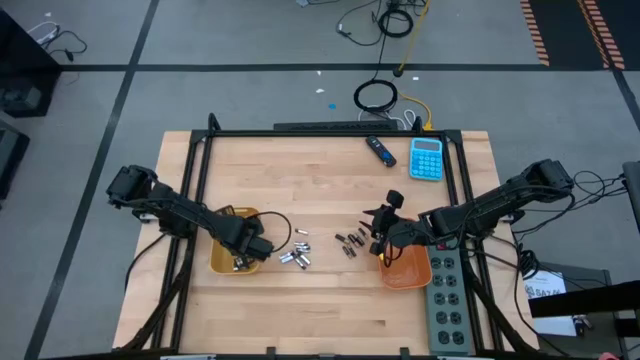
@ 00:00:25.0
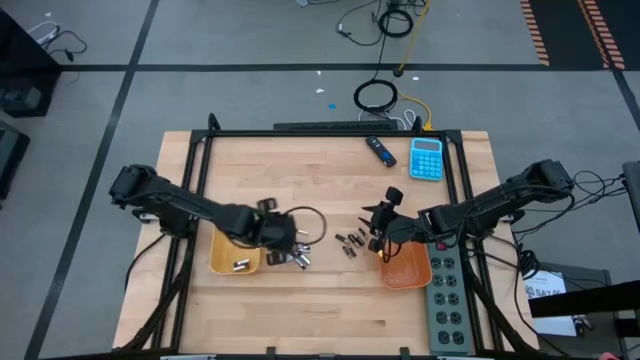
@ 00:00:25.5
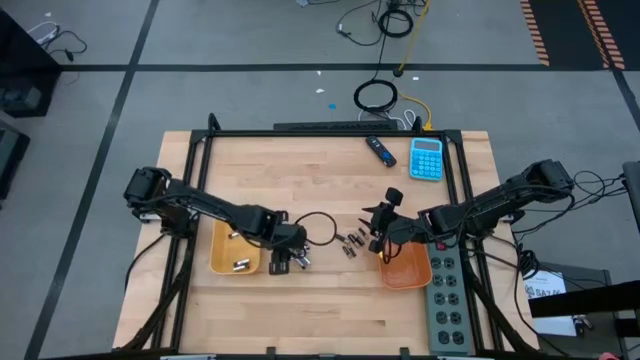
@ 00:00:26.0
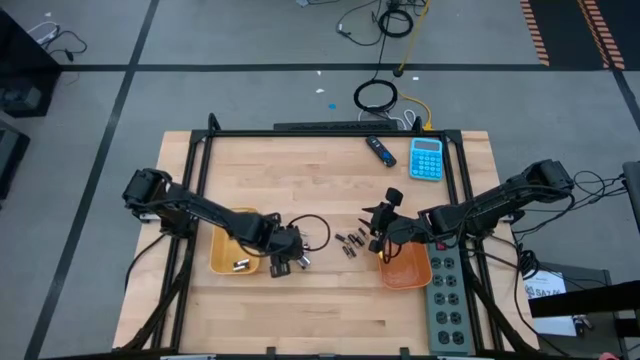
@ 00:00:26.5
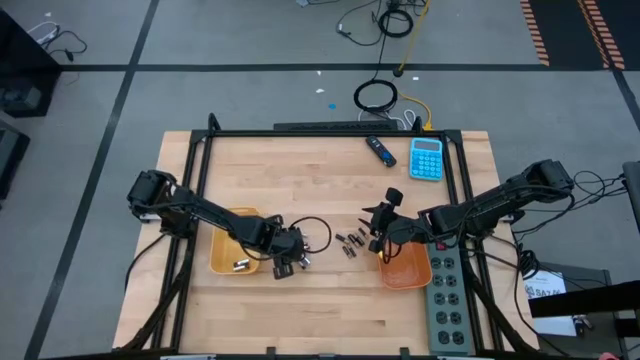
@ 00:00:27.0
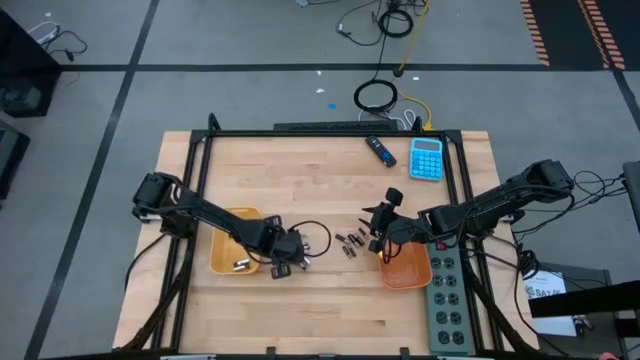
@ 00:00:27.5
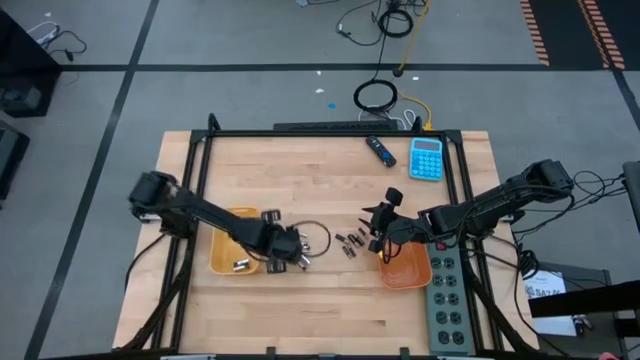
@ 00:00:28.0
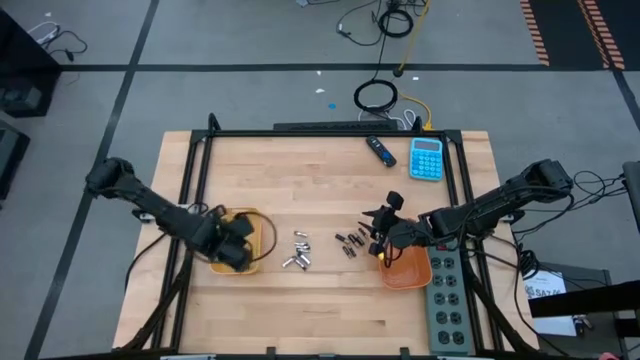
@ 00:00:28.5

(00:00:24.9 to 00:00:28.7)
Task: Sort batteries
Put the white battery into the yellow bin

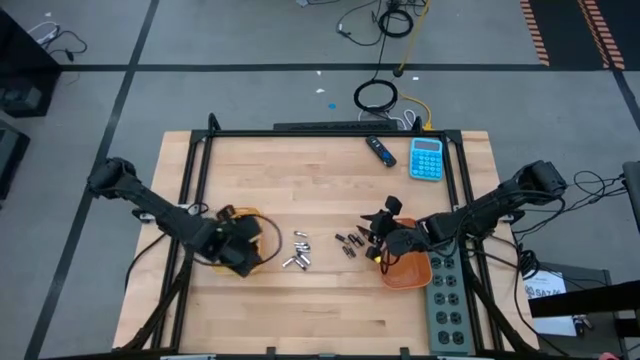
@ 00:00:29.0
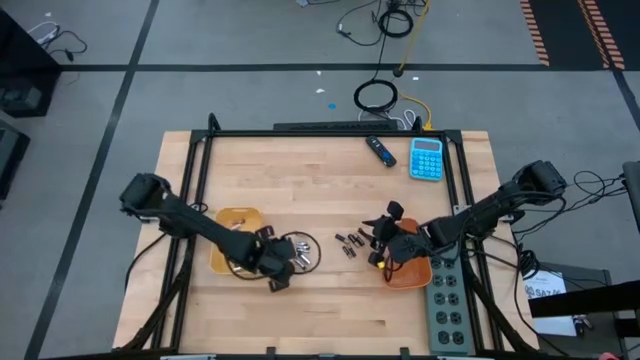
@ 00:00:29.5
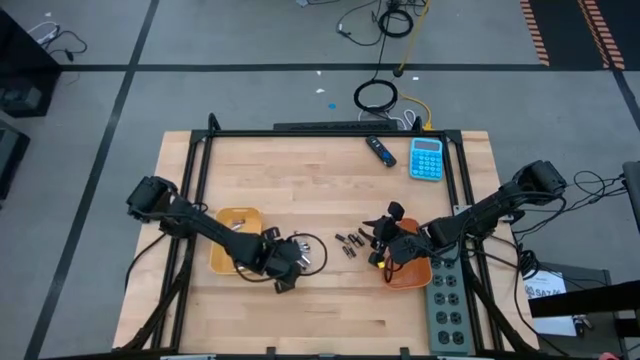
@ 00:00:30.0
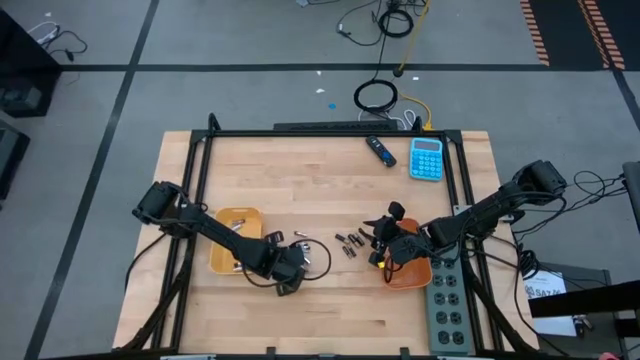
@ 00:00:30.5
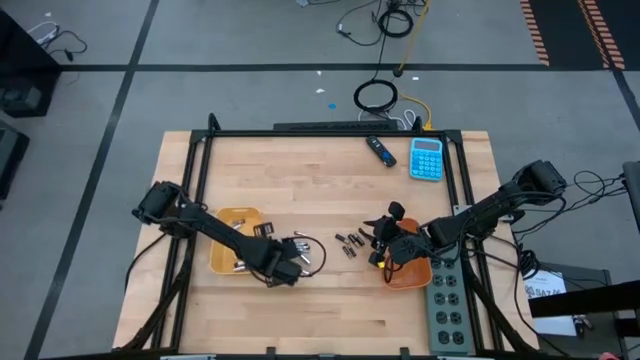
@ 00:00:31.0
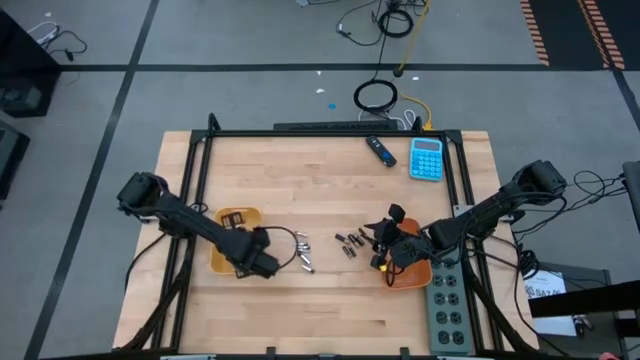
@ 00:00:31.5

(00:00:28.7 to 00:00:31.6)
Put the white battery into the yellow bin

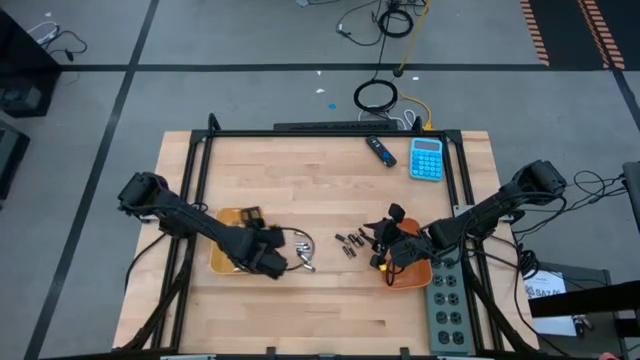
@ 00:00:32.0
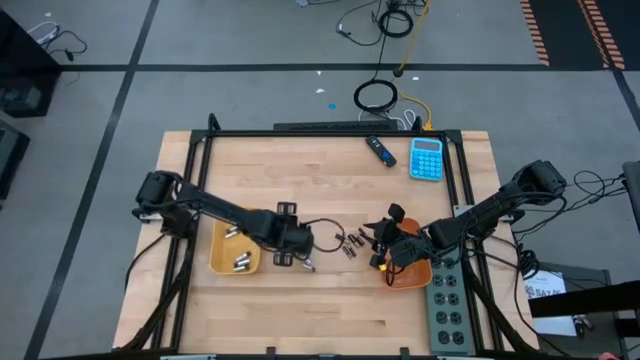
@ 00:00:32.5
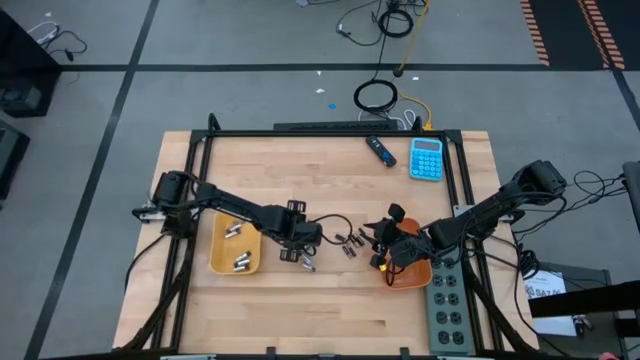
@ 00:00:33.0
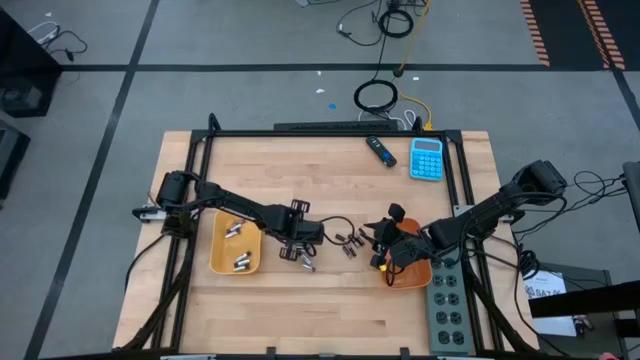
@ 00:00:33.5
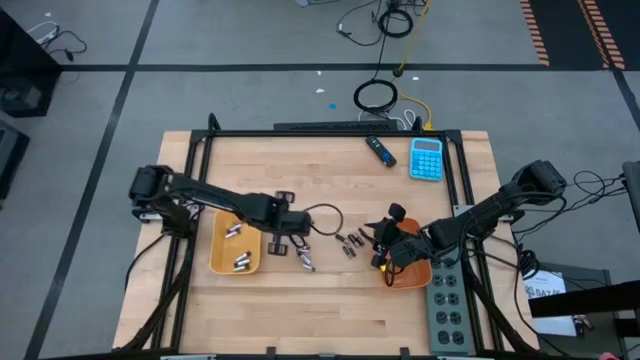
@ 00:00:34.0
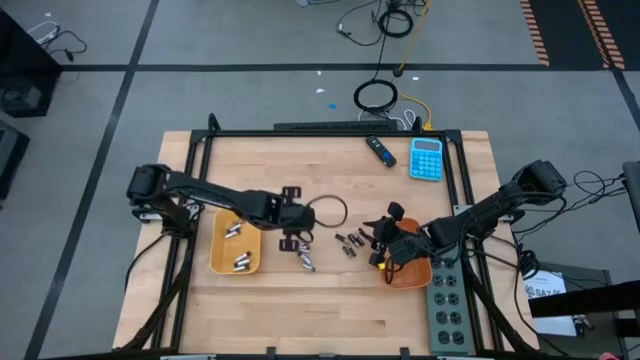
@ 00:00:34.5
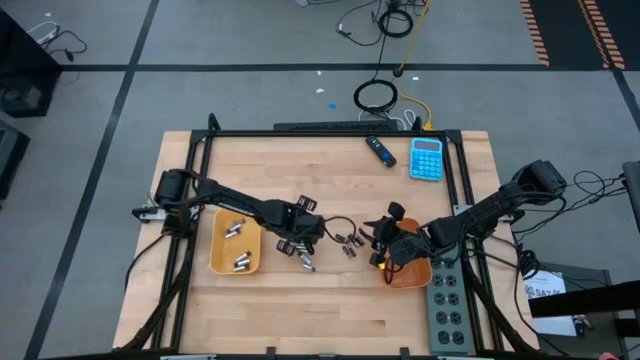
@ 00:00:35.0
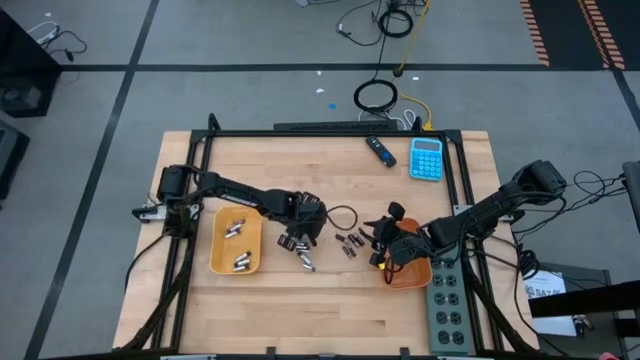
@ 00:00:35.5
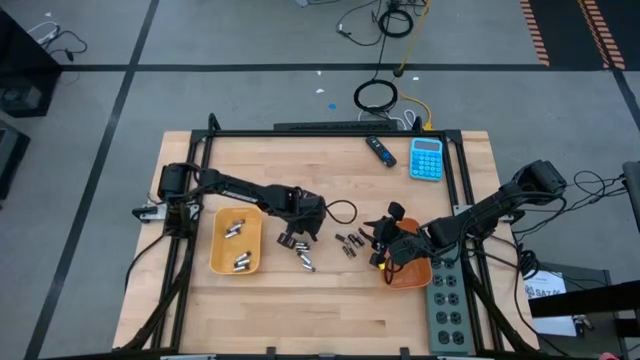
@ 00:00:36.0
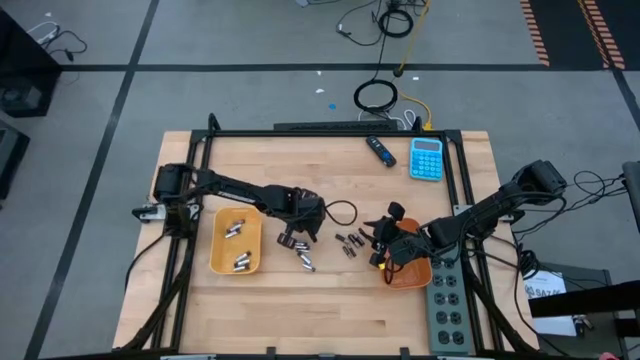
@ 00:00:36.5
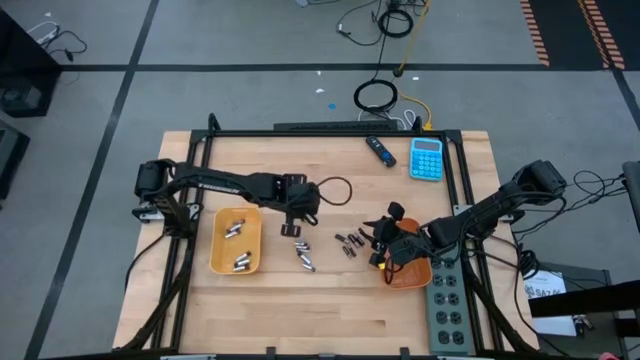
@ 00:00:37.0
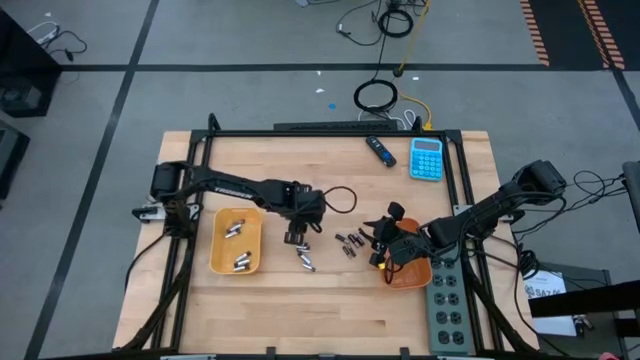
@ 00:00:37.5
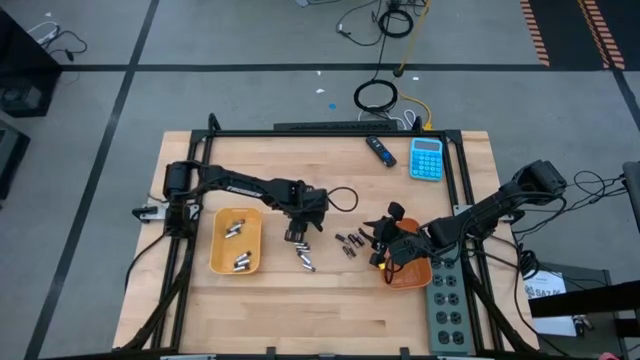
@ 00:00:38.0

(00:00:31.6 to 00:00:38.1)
Put the white battery into the yellow bin

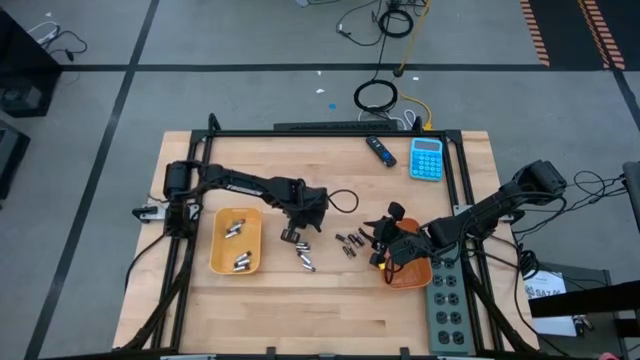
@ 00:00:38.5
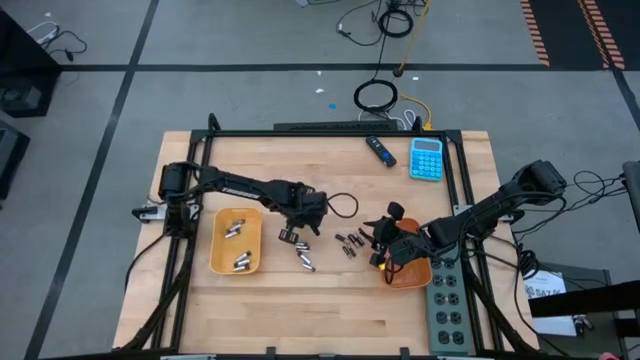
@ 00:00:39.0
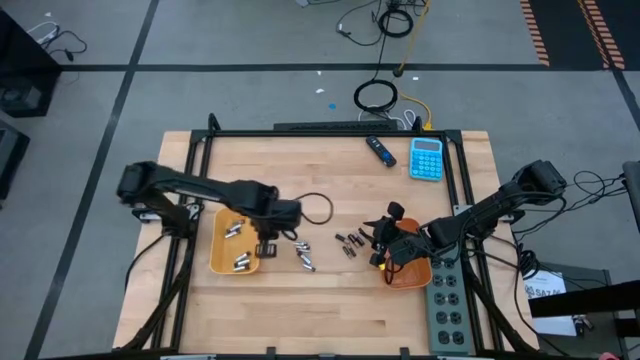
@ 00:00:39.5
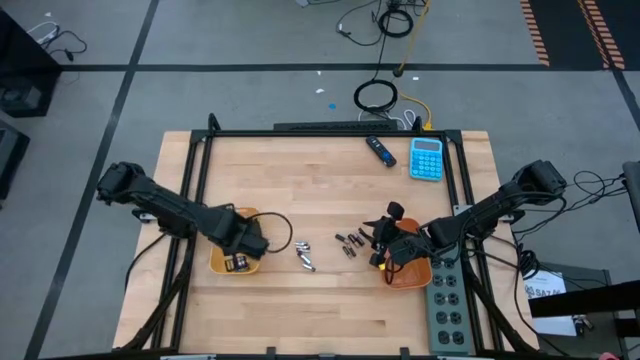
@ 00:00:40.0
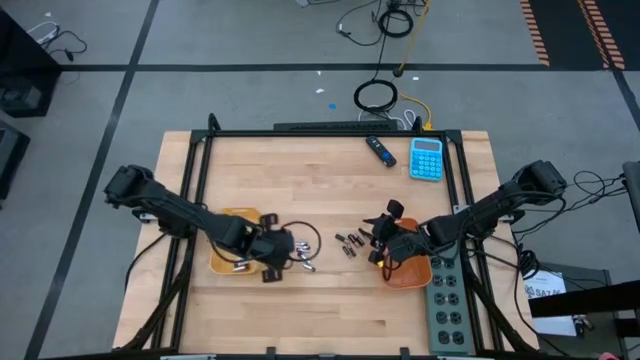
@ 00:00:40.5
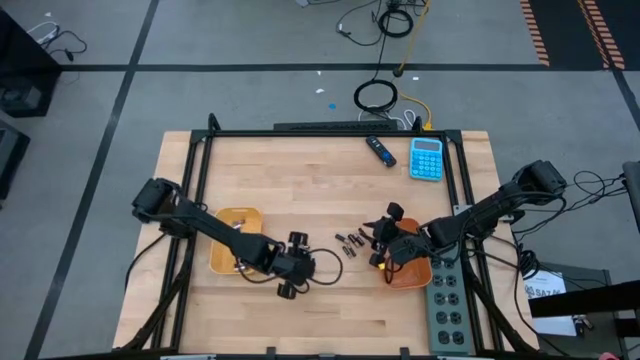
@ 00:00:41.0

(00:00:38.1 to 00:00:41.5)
Put the white battery into the yellow bin

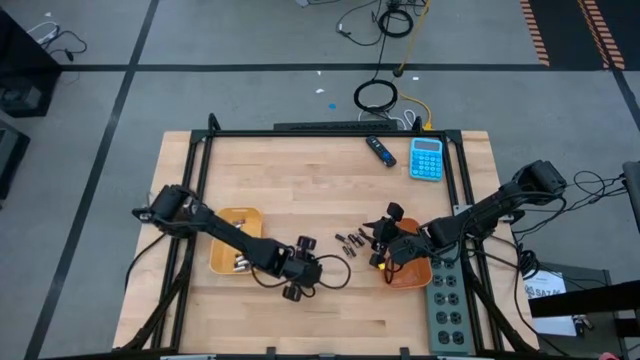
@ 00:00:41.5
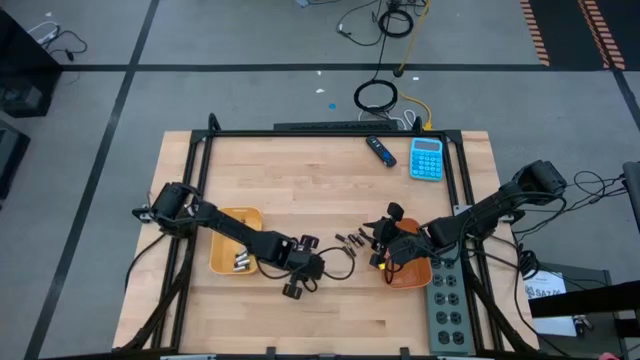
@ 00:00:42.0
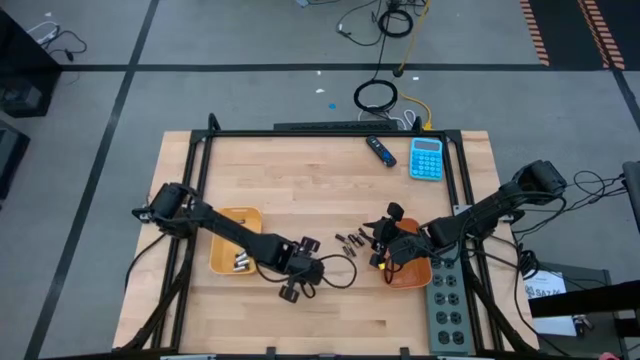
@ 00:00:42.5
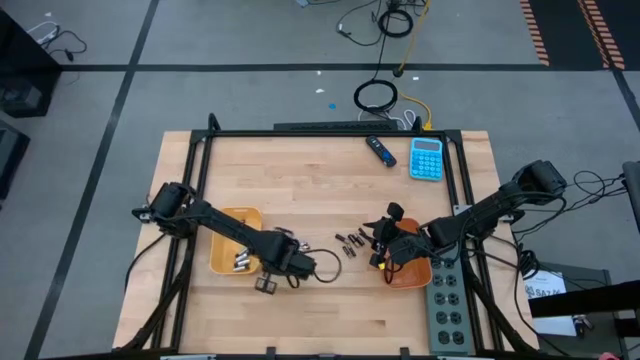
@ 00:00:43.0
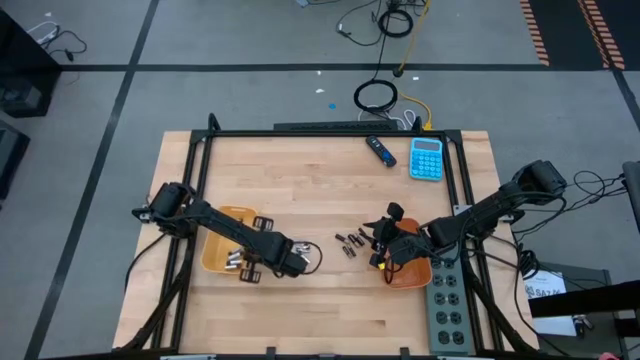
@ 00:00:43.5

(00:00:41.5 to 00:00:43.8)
Put the white battery into the yellow bin

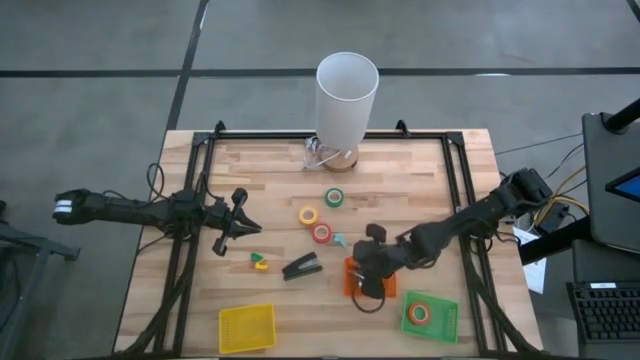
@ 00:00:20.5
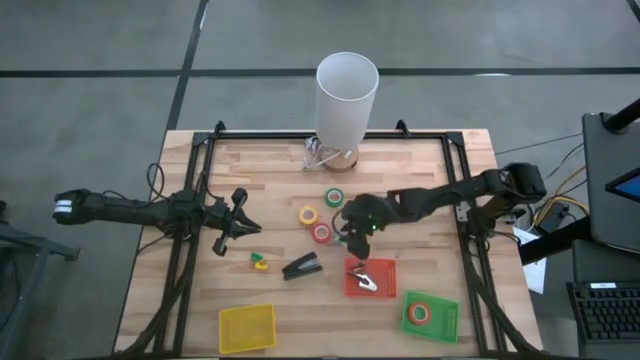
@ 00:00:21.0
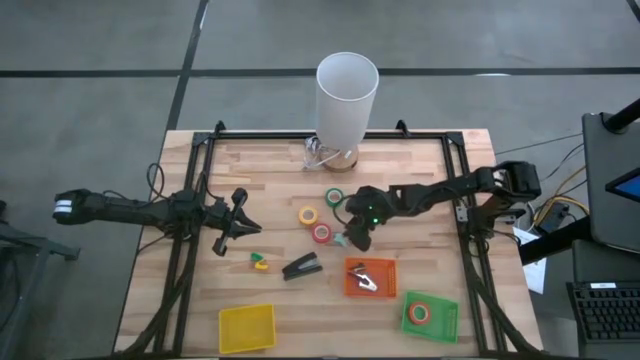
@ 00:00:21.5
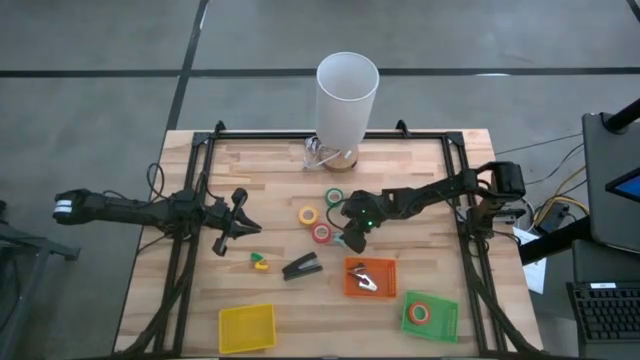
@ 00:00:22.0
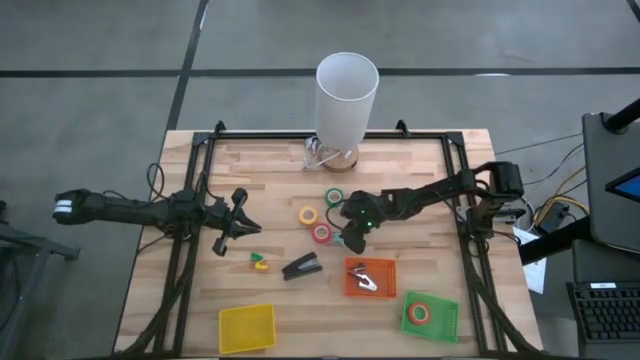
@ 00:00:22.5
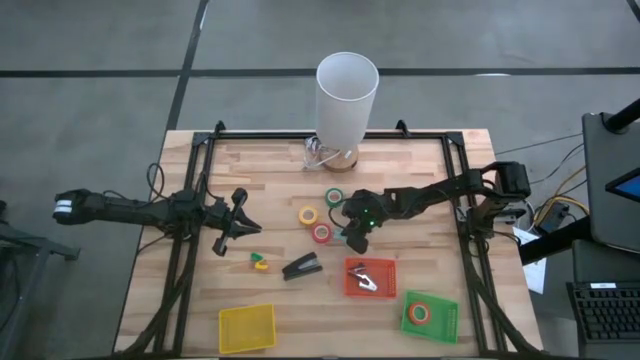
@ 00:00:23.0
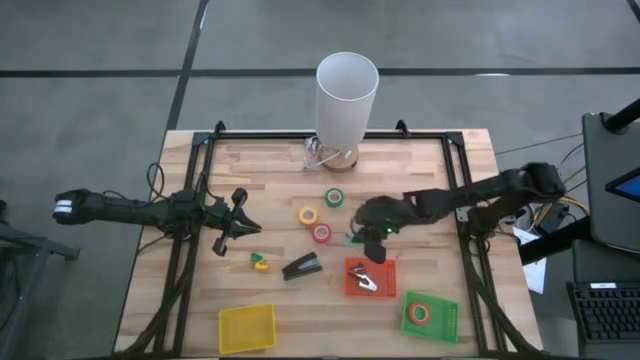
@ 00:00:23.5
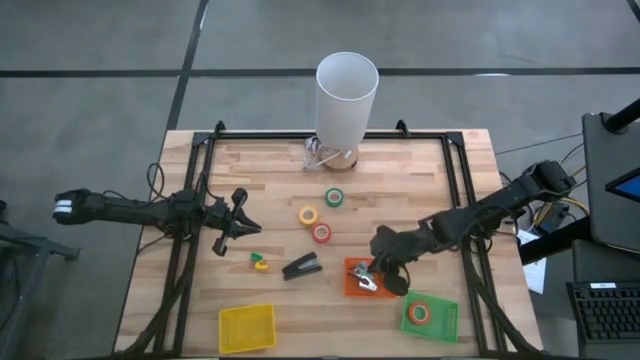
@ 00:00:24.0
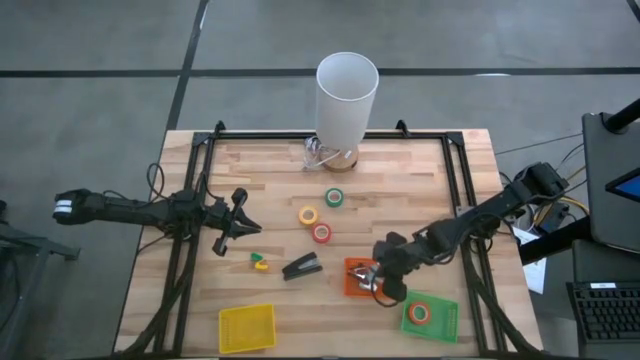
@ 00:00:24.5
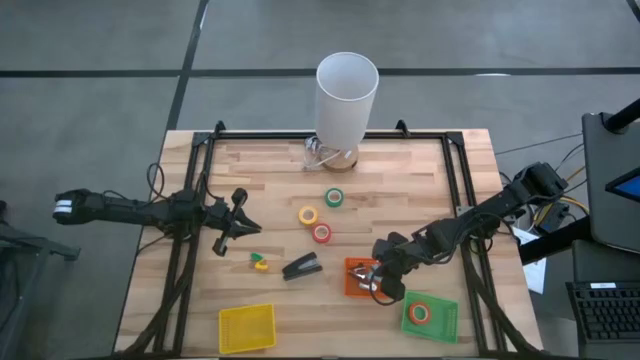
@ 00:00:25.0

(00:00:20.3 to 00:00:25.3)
Task: Pick and place Stapler, Stapler remover, tape
Put the light blue stapler remover into the orange basket
